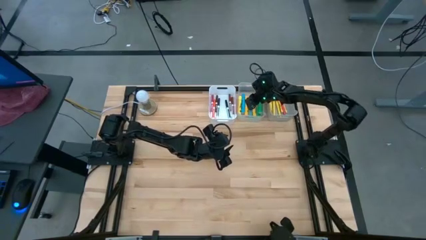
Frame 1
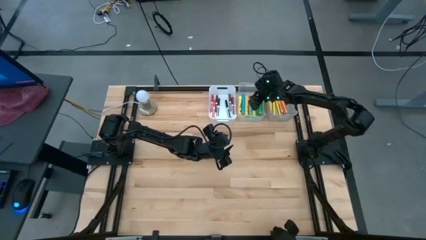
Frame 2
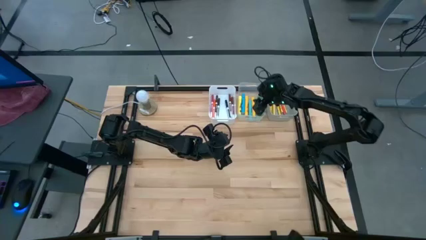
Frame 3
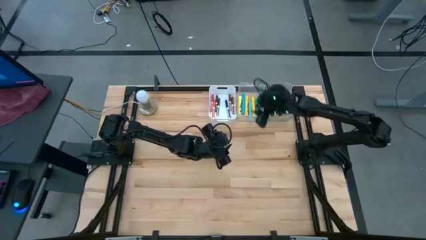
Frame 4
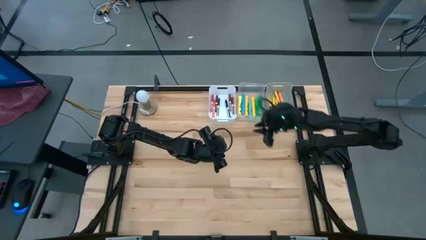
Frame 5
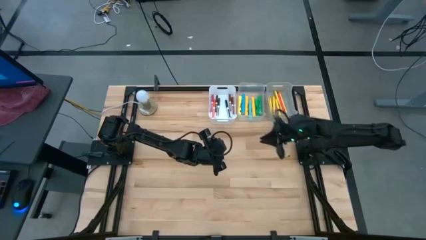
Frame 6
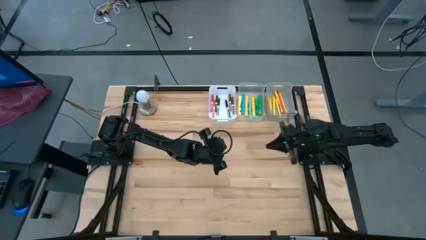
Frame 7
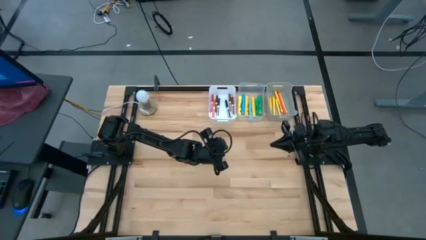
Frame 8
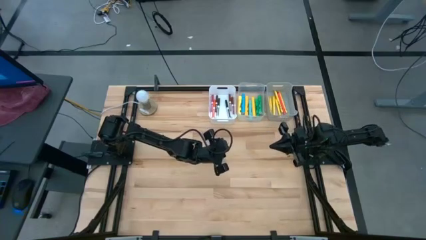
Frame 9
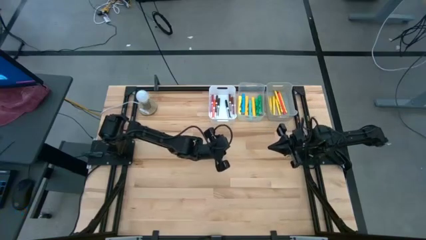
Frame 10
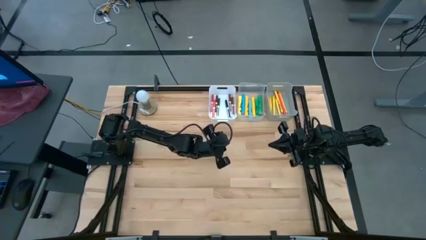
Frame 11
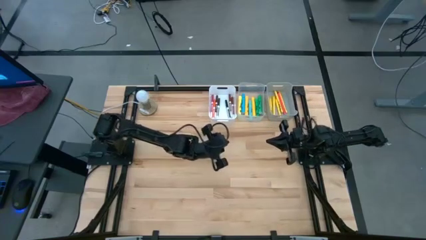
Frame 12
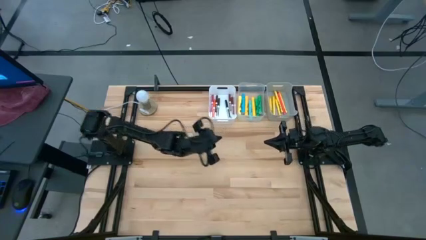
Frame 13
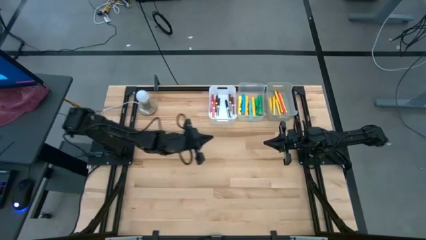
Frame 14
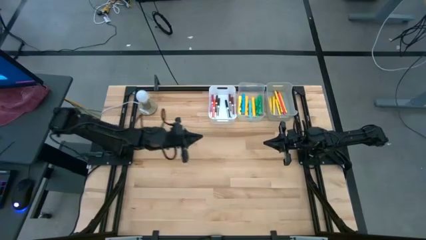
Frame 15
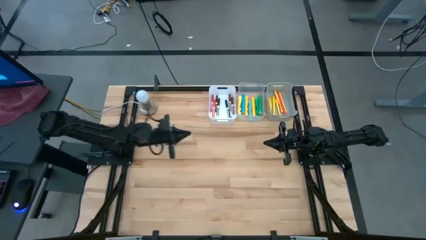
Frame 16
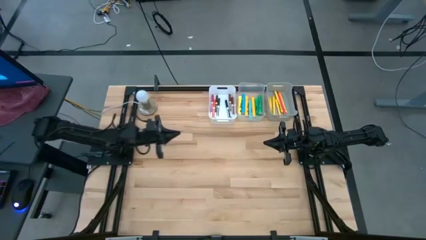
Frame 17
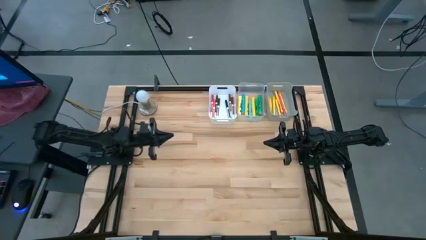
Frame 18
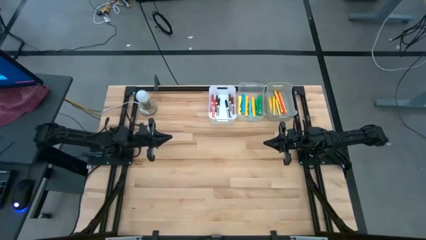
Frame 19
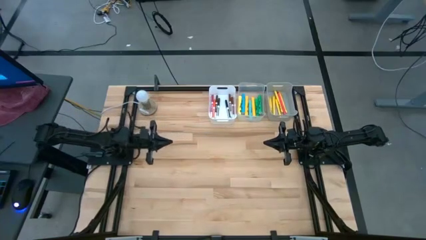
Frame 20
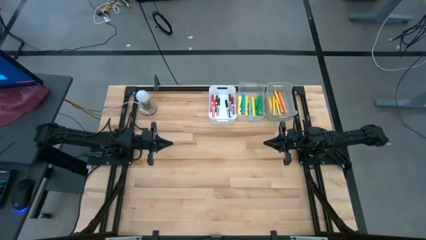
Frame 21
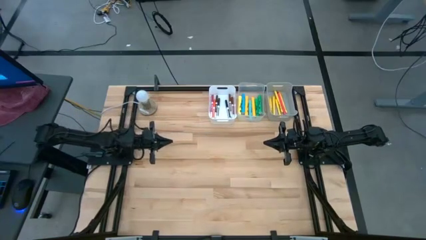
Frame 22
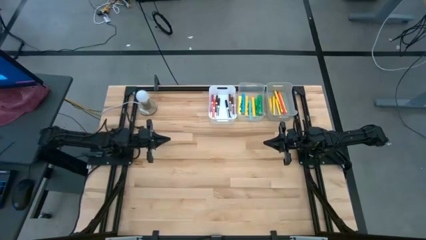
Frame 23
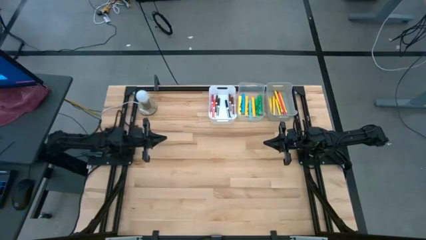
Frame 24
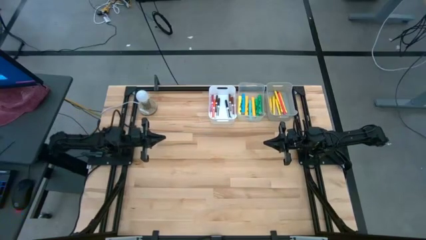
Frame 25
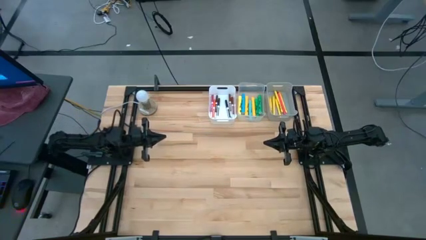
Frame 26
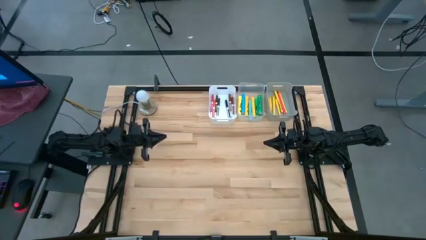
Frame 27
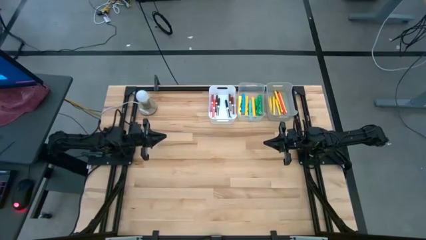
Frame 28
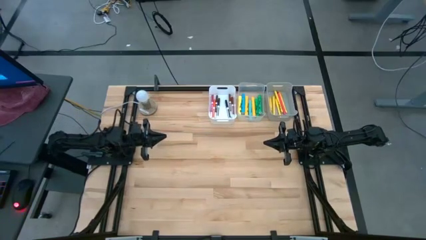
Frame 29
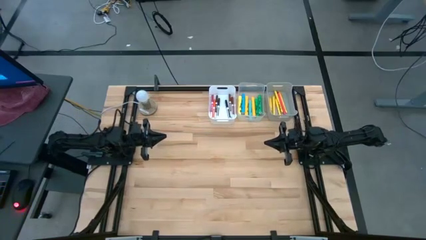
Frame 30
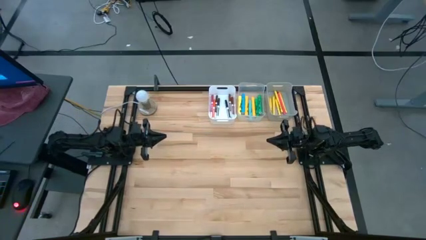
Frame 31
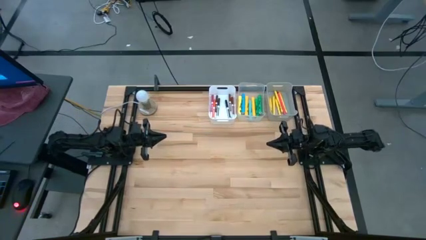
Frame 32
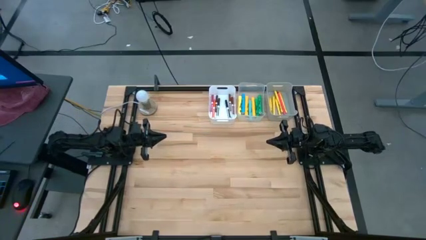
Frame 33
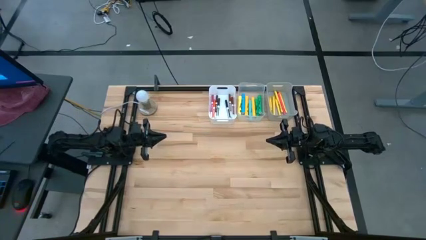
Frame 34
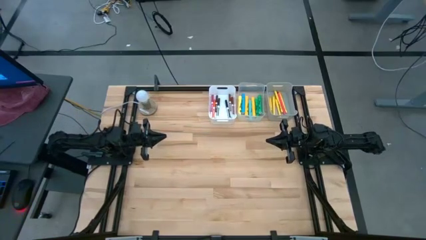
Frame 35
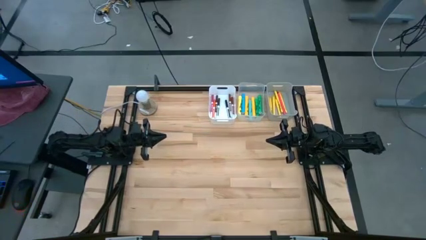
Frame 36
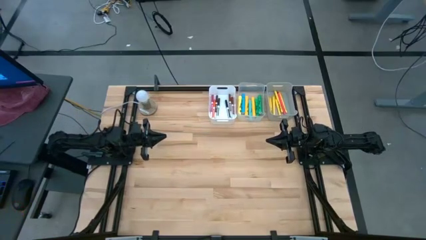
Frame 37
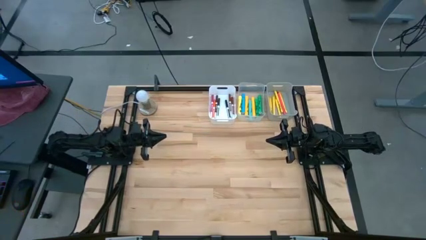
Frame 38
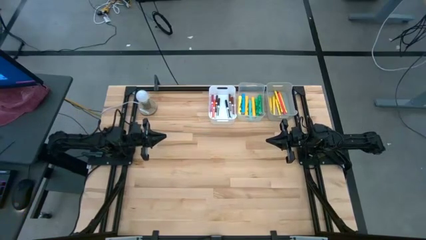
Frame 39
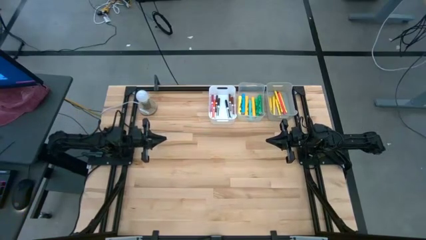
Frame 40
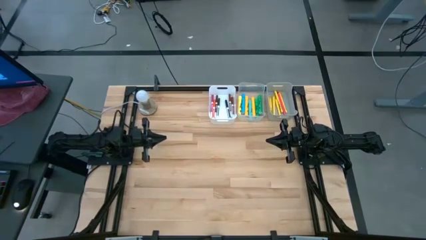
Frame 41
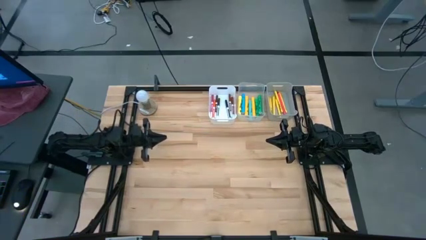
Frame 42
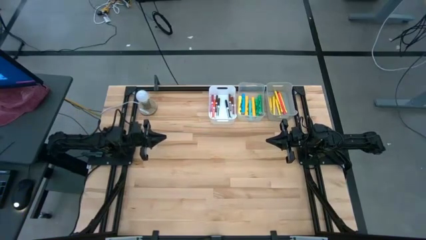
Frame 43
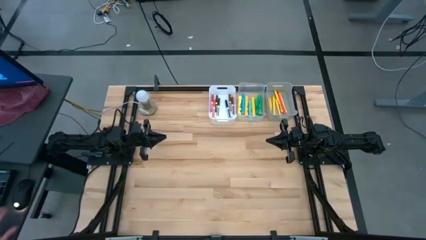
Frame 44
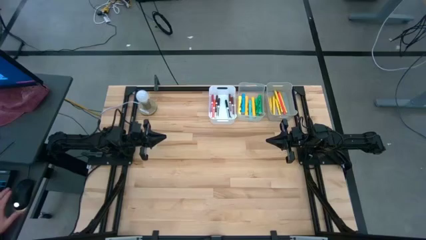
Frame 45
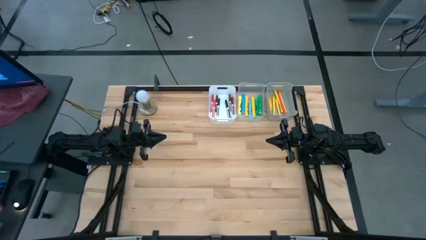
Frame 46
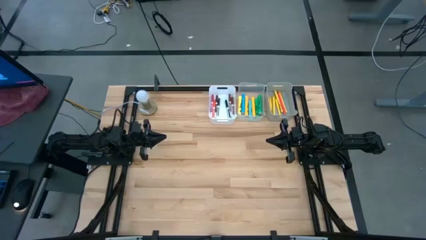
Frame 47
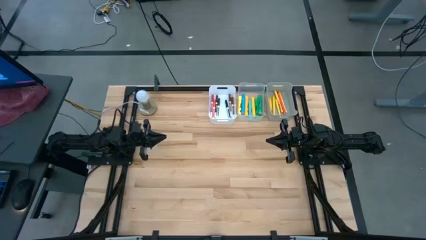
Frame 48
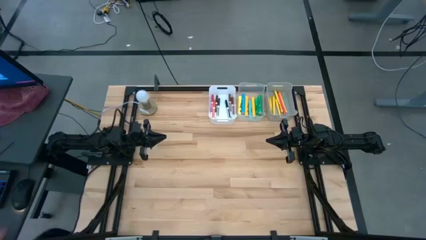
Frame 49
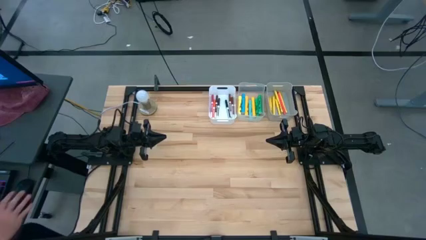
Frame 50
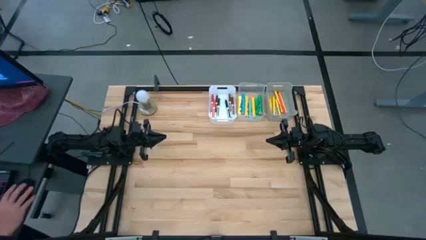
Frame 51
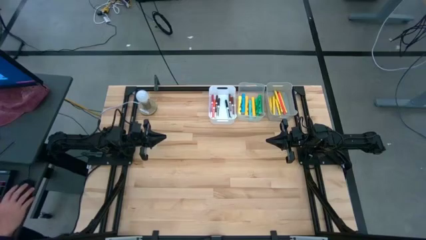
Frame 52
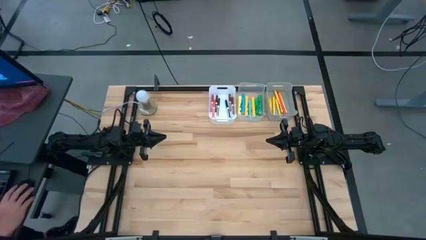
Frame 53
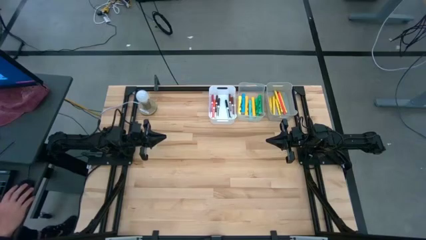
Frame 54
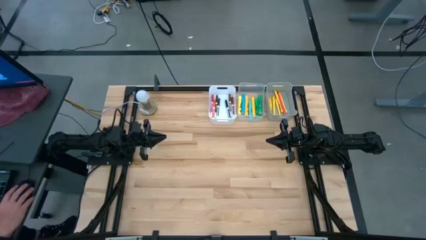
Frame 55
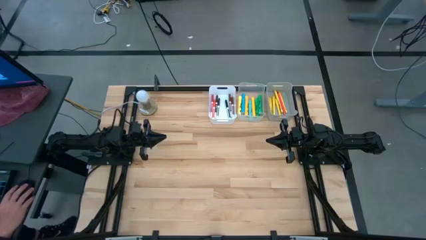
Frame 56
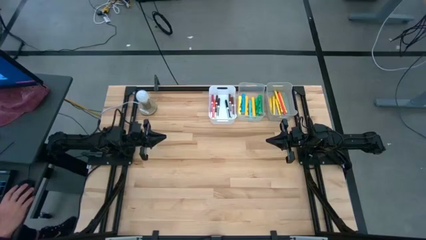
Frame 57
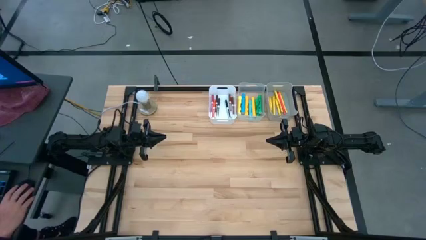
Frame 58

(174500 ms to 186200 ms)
Task: Pick & Place Markers
Return to Home Position

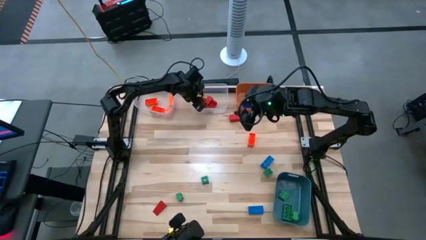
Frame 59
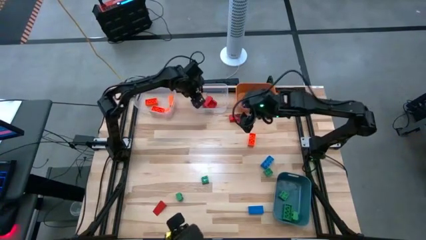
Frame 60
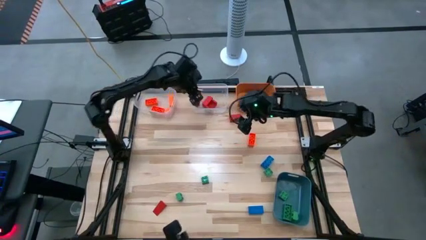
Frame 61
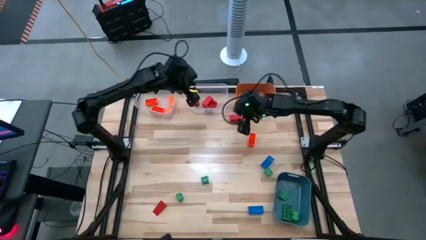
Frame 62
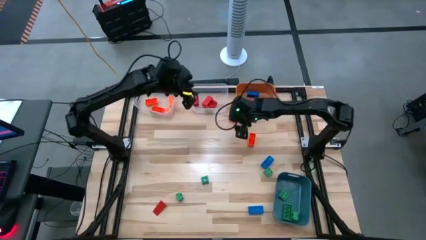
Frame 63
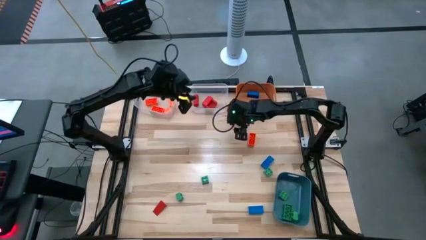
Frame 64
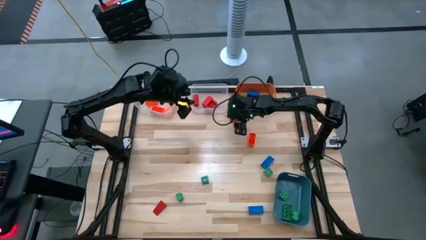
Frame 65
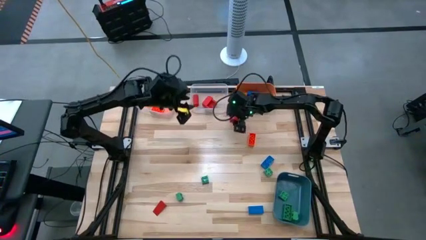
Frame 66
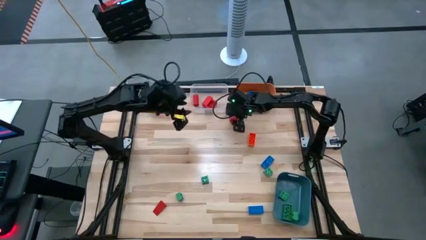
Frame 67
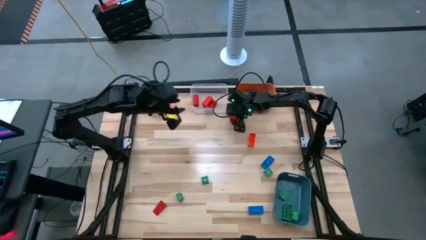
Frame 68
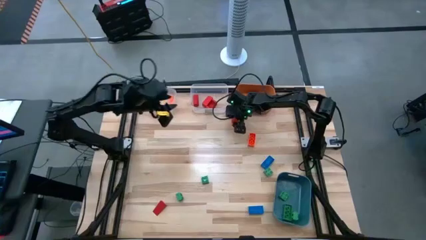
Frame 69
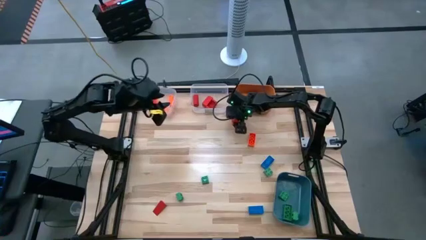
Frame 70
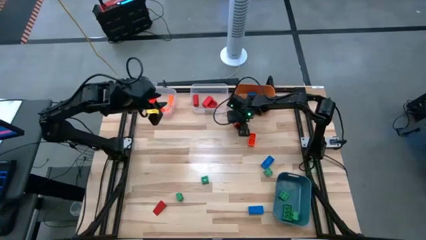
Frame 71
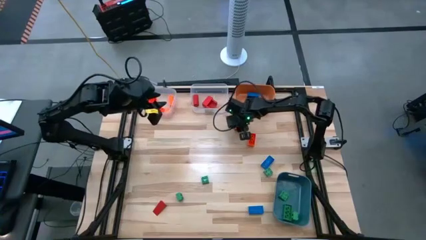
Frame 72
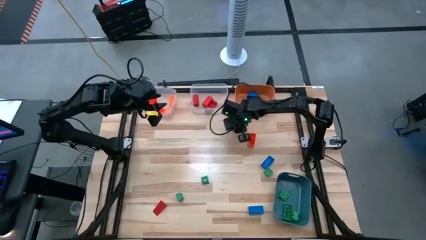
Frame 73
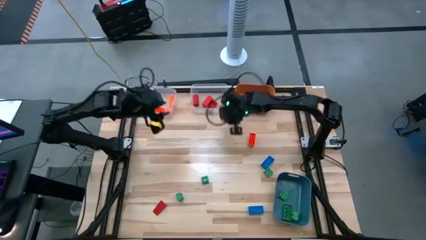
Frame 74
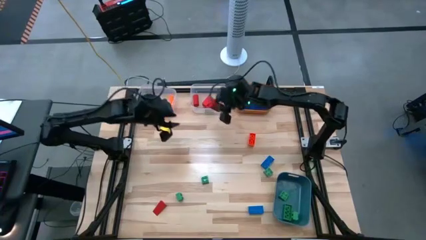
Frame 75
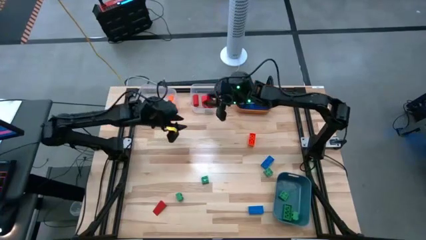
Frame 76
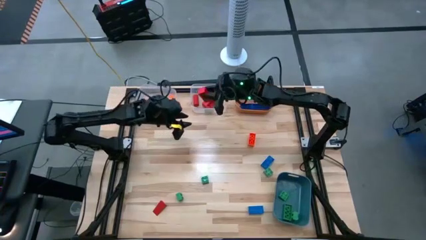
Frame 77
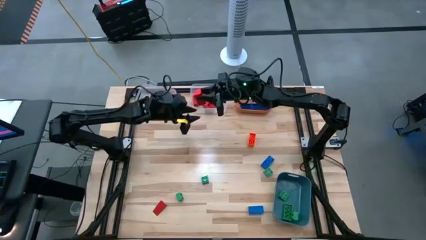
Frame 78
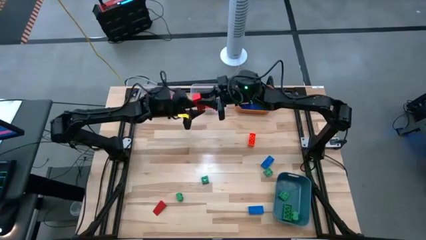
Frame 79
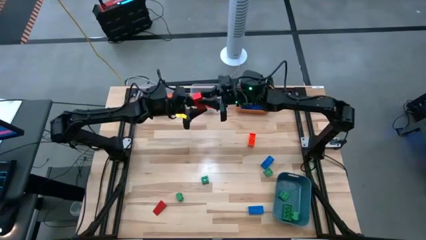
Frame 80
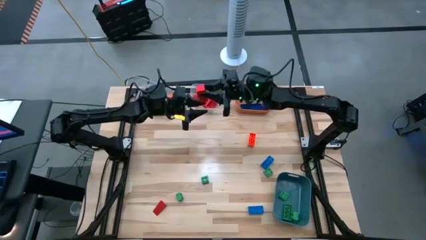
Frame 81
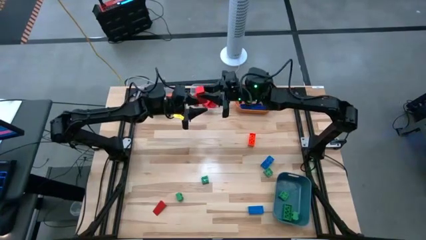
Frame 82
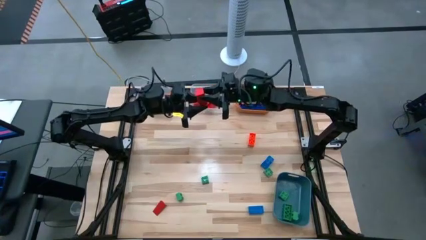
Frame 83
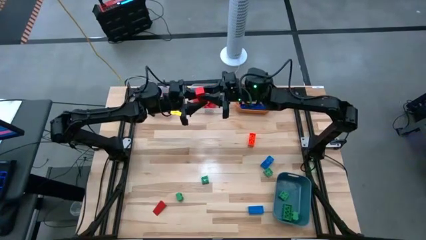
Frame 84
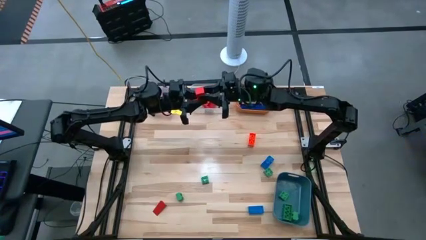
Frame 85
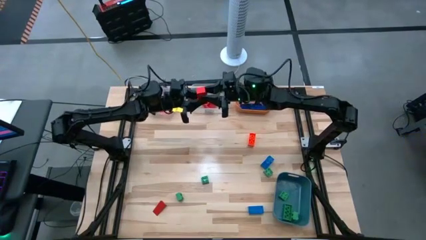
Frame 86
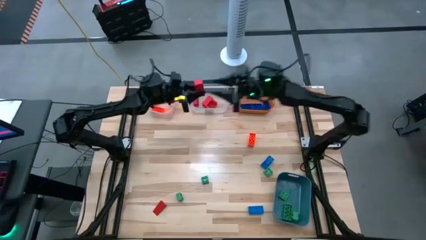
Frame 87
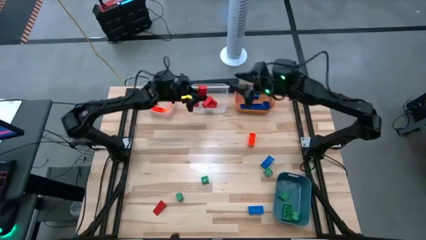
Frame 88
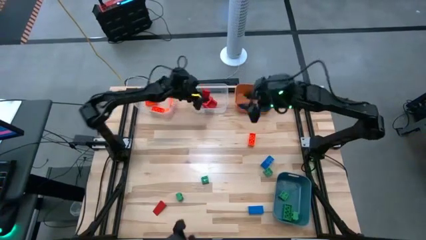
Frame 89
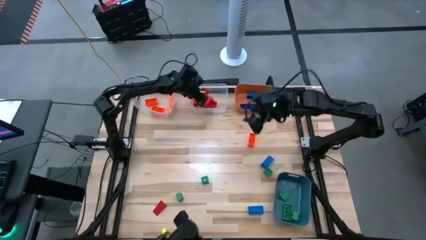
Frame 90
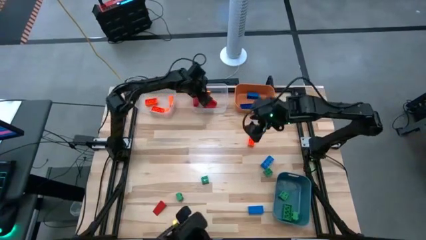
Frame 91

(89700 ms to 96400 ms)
Task: Sort blocks
Put the red block into the right transparent bin
